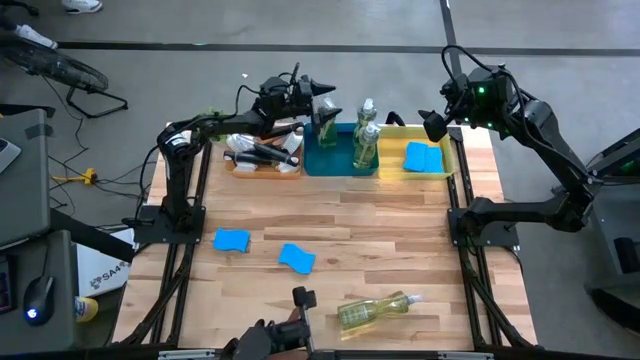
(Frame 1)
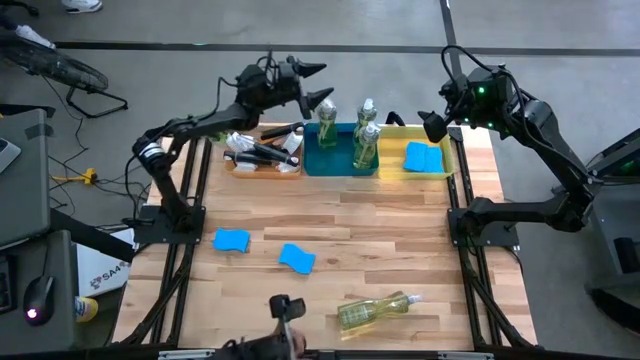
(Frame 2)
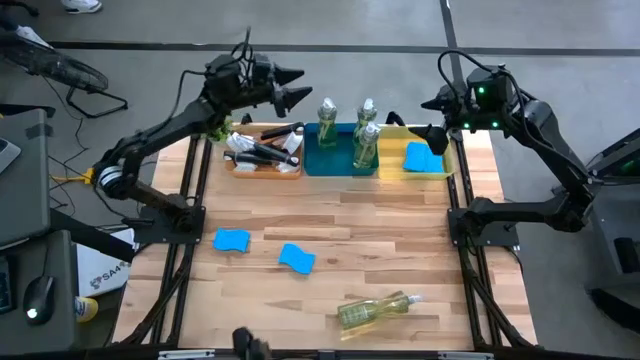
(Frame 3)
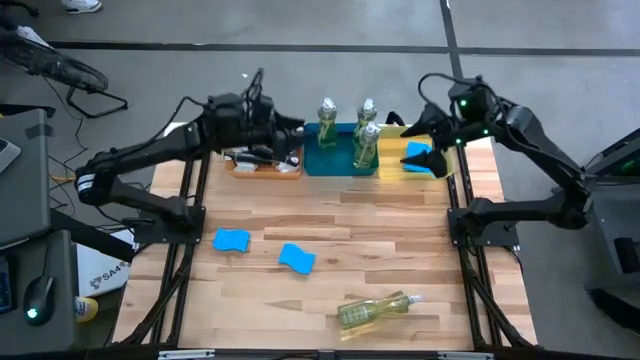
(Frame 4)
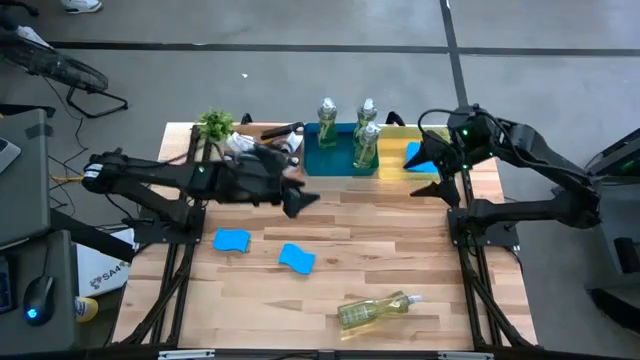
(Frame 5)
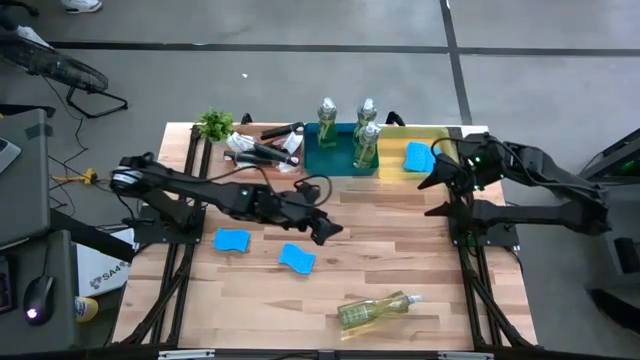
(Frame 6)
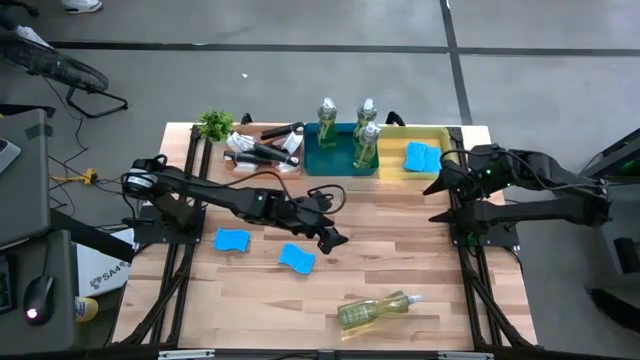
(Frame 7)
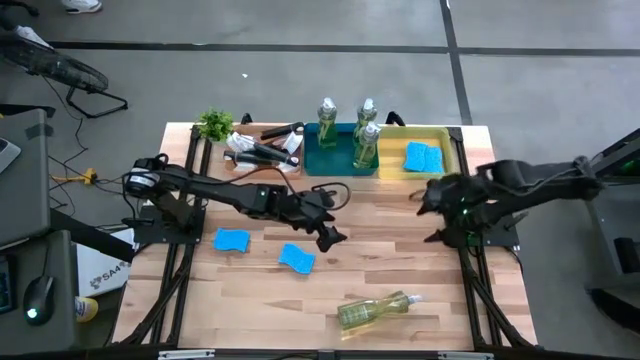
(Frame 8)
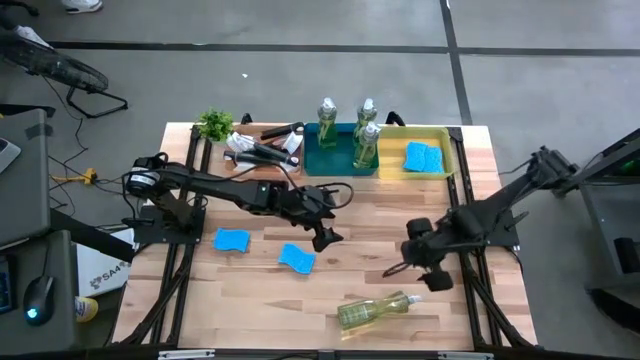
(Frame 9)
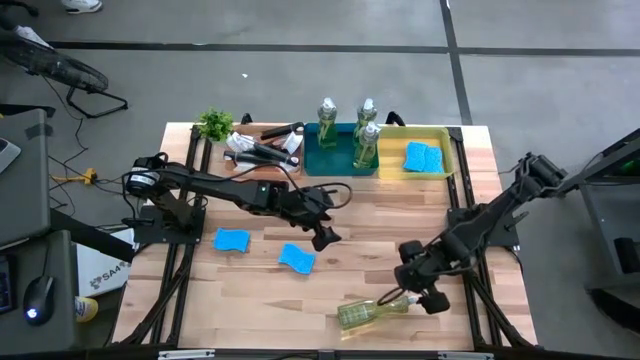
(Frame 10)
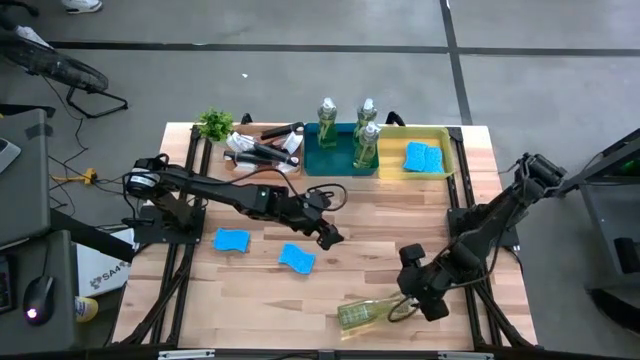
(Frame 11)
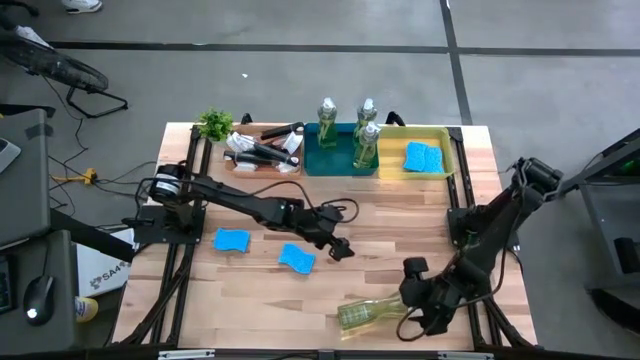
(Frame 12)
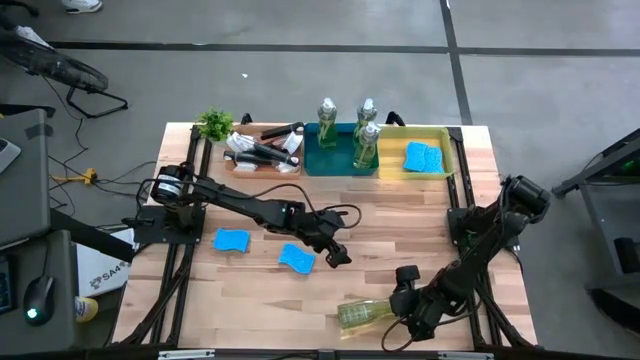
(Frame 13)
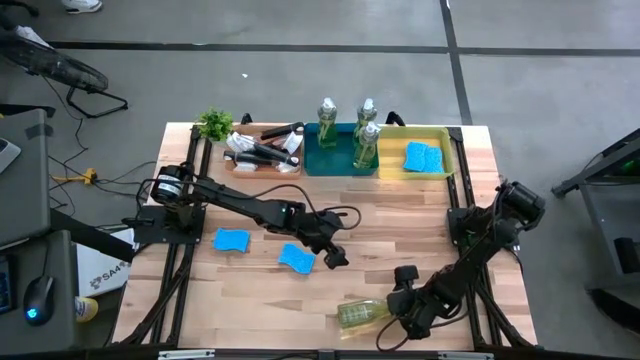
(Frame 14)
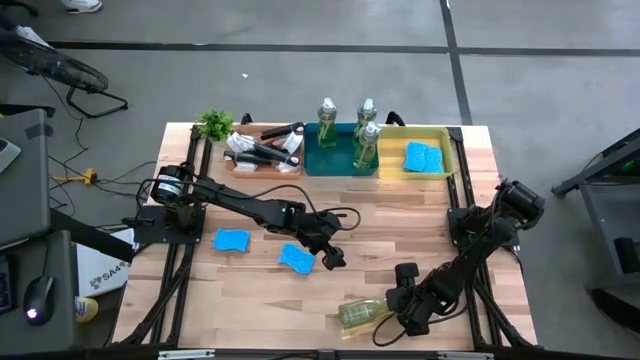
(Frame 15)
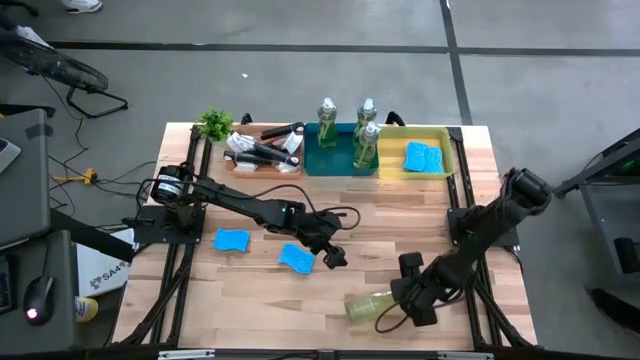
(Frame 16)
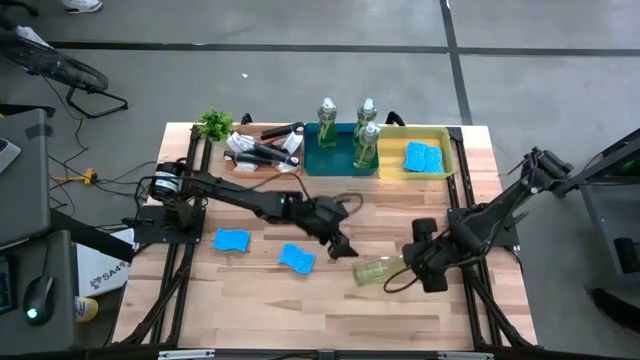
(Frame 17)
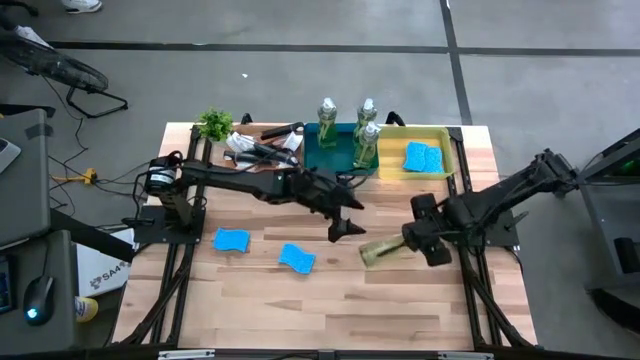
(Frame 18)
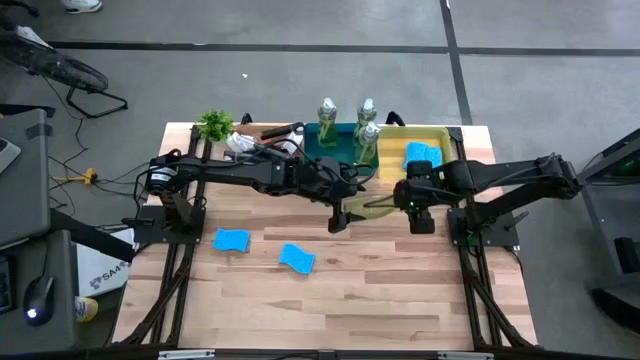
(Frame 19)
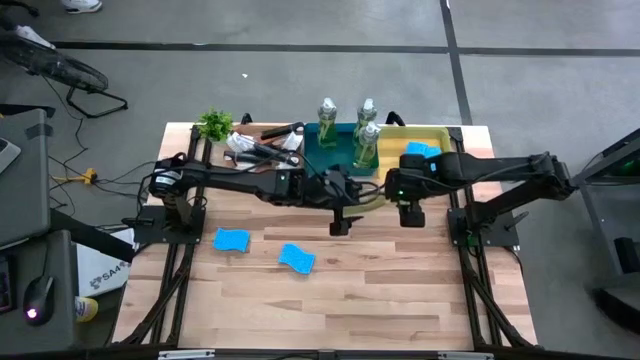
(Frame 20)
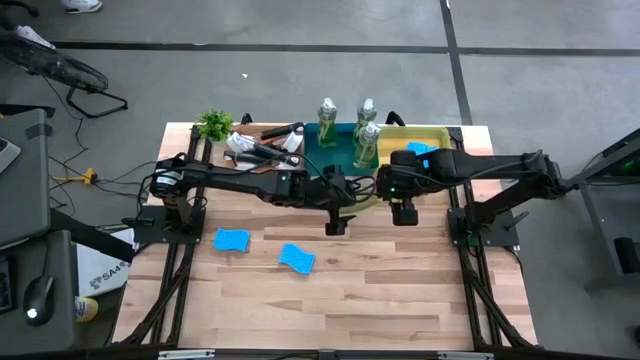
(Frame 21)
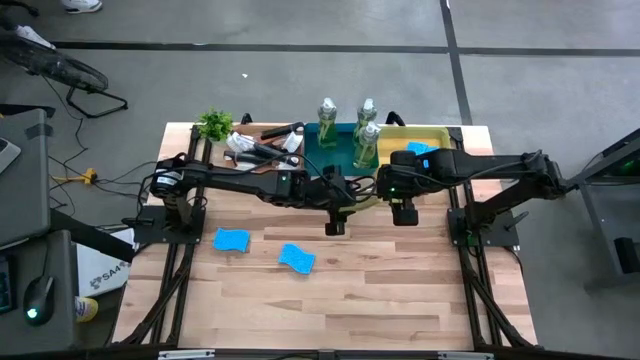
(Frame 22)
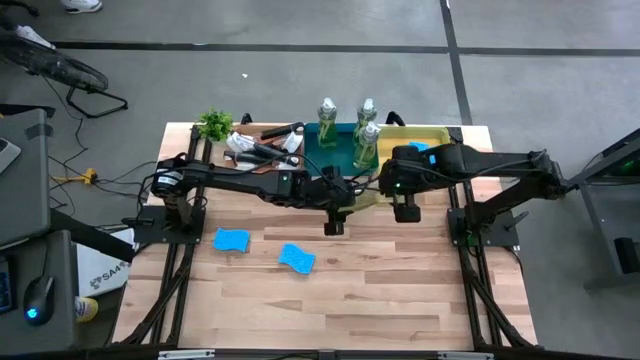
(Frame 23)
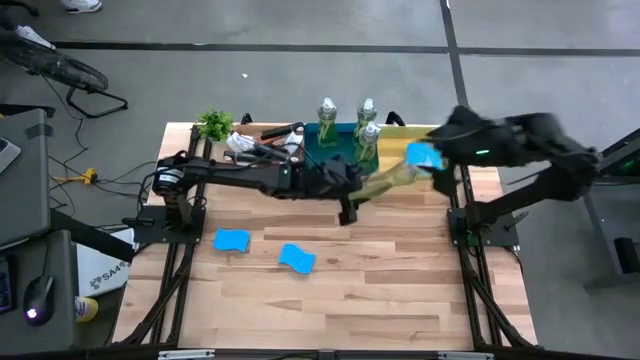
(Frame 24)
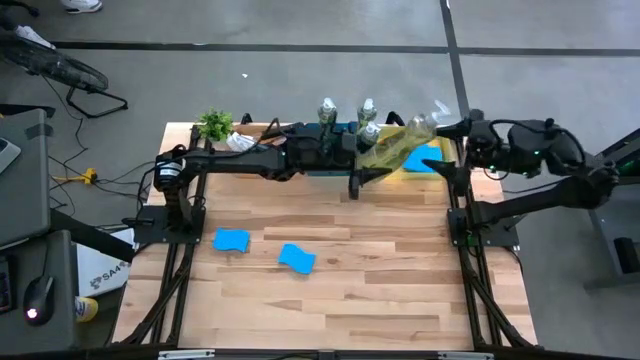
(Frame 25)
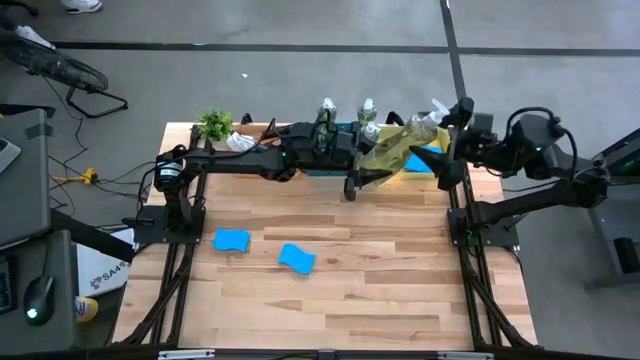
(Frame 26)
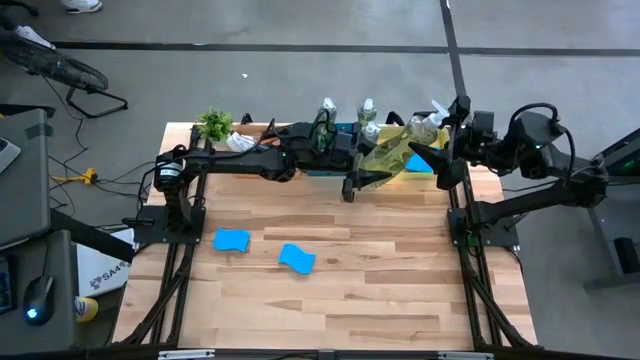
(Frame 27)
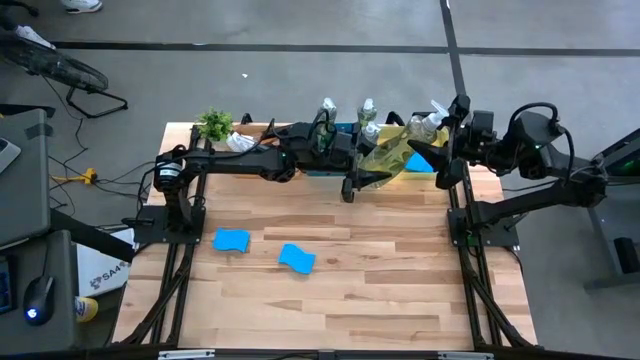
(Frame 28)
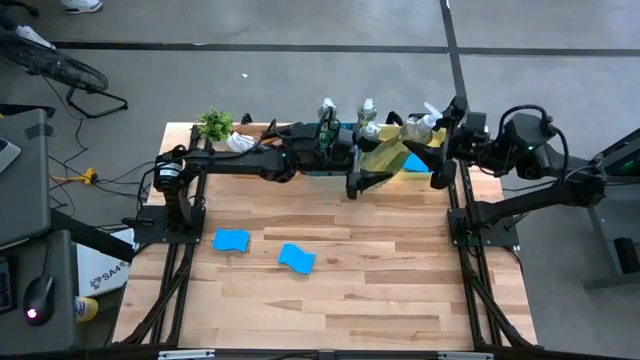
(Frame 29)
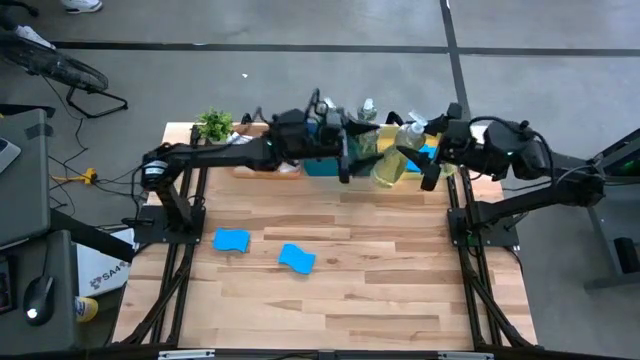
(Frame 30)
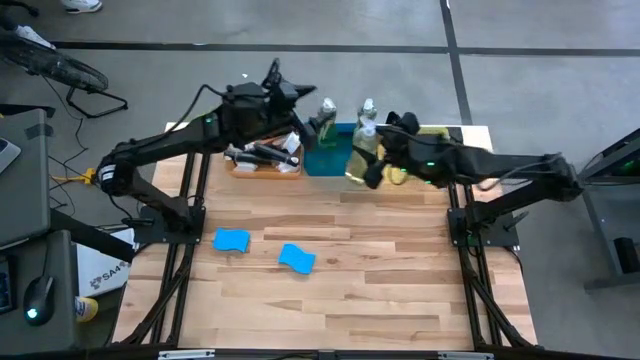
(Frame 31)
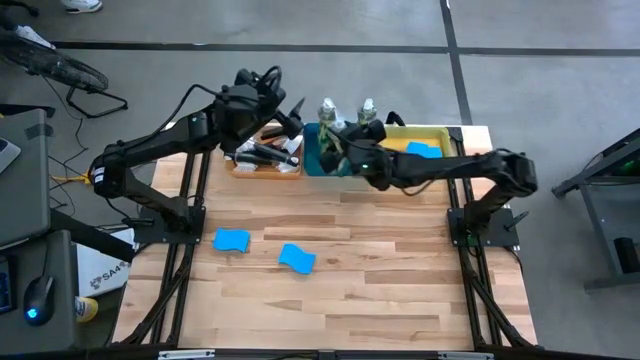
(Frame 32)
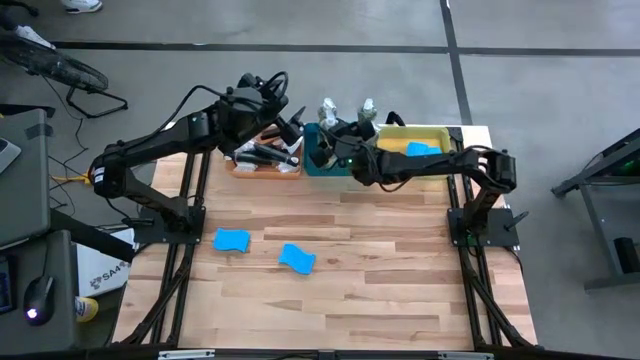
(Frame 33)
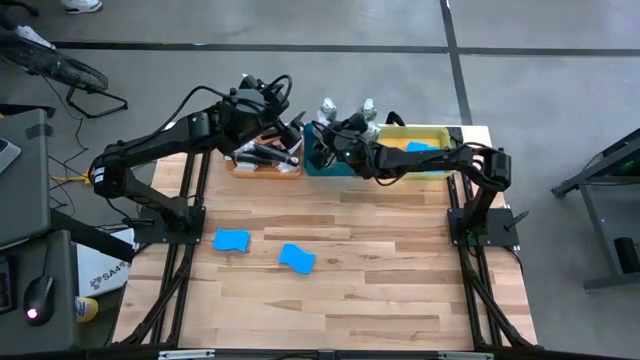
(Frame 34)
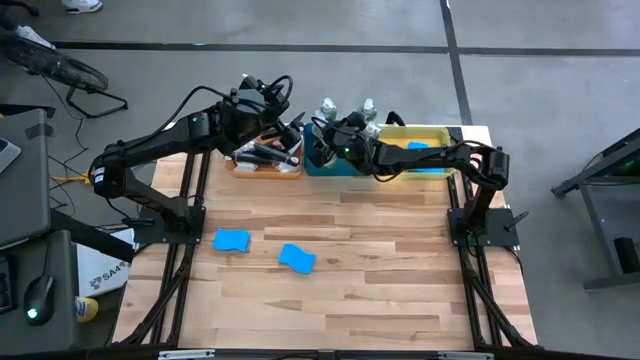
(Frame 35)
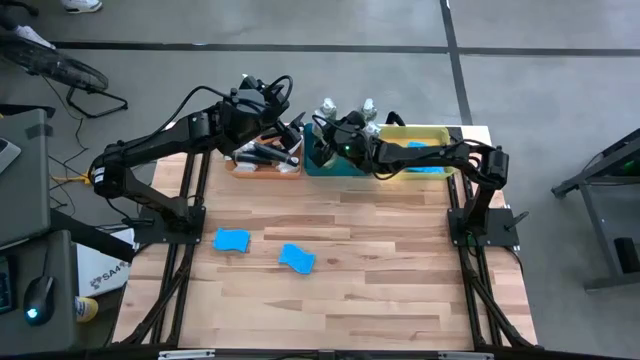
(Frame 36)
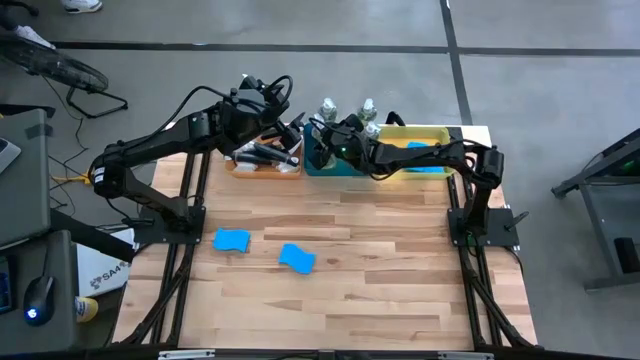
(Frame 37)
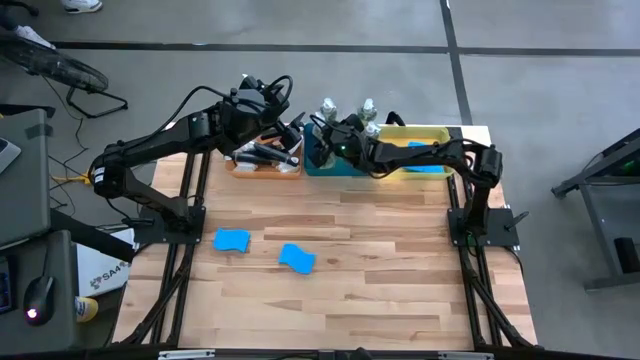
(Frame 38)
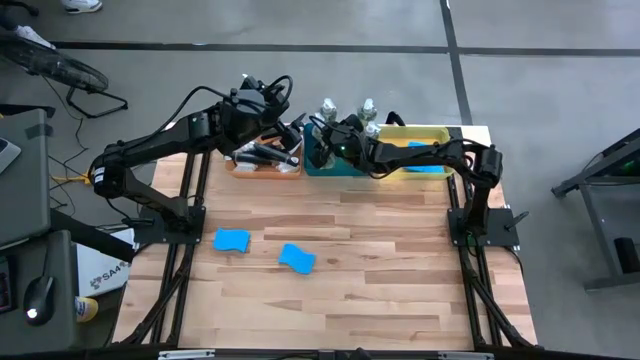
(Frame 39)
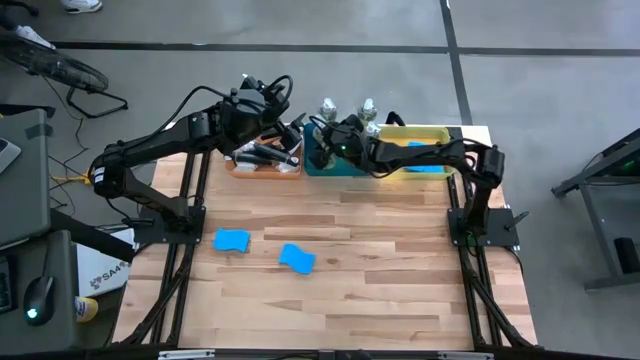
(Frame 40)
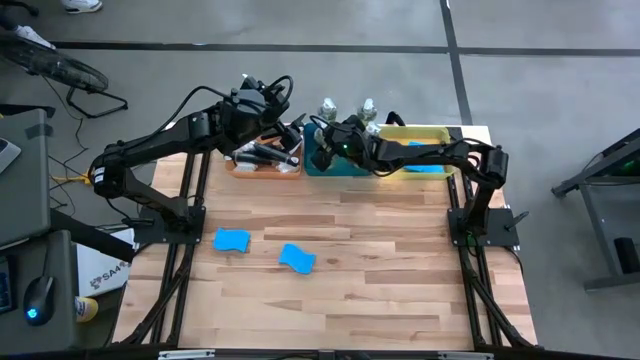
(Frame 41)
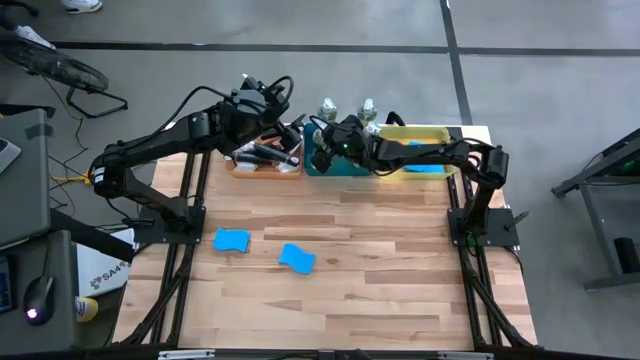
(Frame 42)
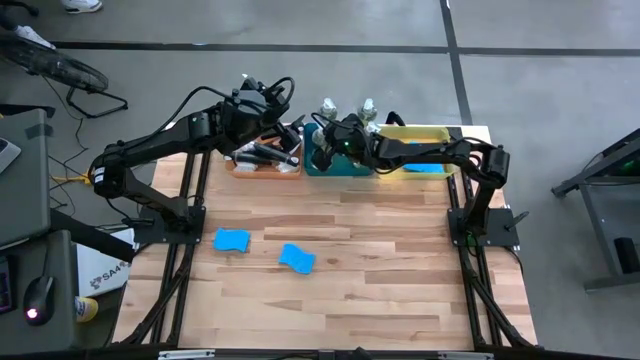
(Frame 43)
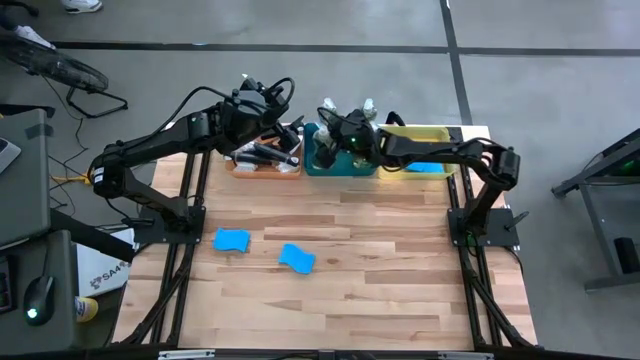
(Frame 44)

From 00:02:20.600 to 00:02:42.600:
Task: Pick & Place Kitchen Sink Supplies
Put the green dishwashing liquid bottle into the blue bin
